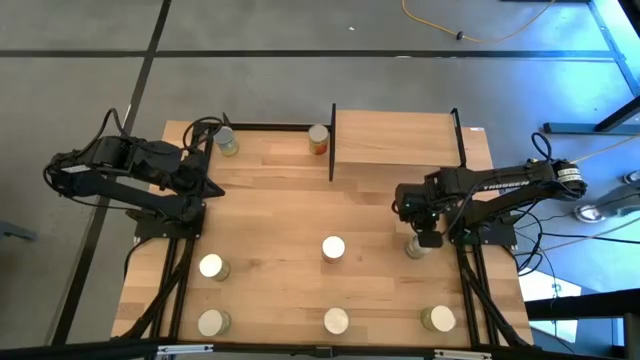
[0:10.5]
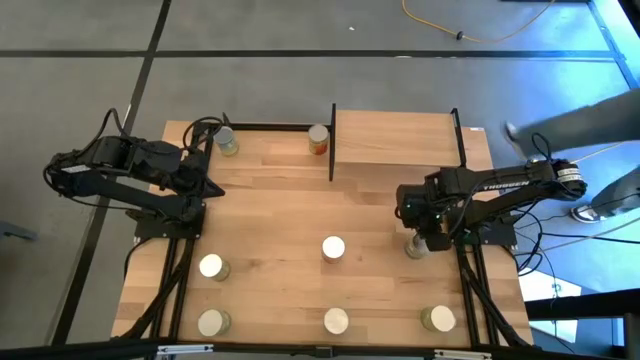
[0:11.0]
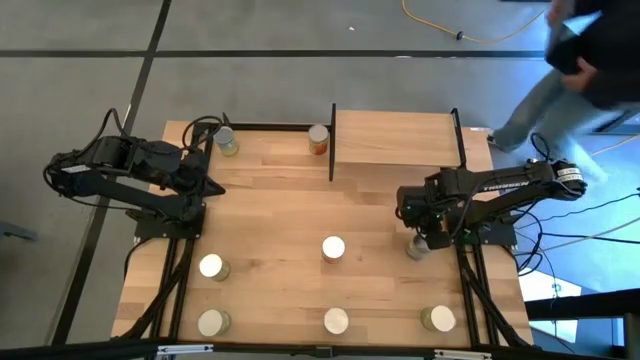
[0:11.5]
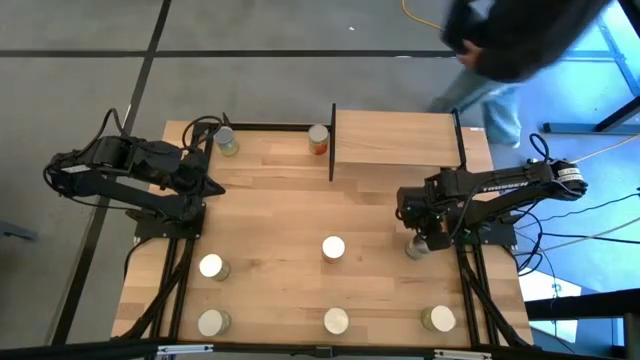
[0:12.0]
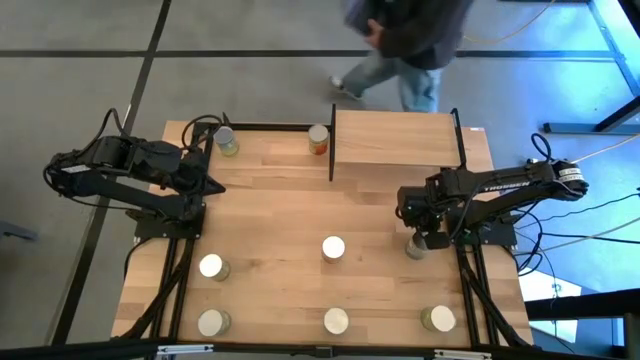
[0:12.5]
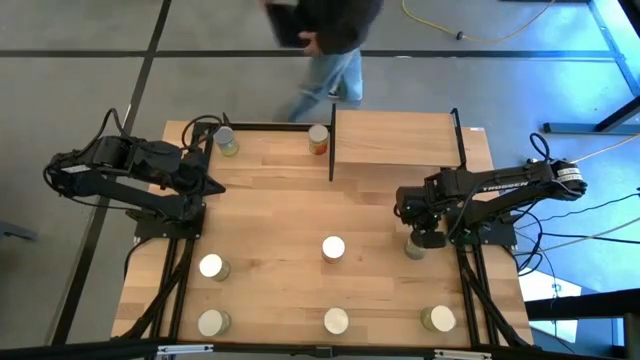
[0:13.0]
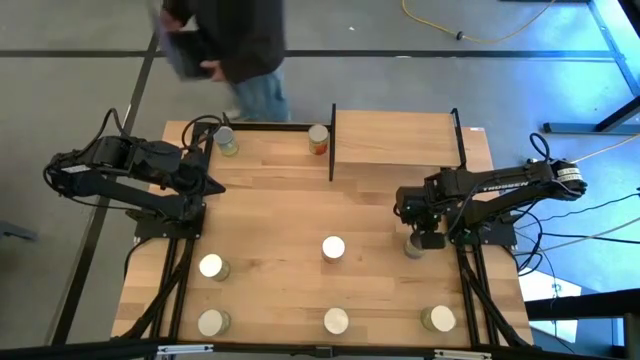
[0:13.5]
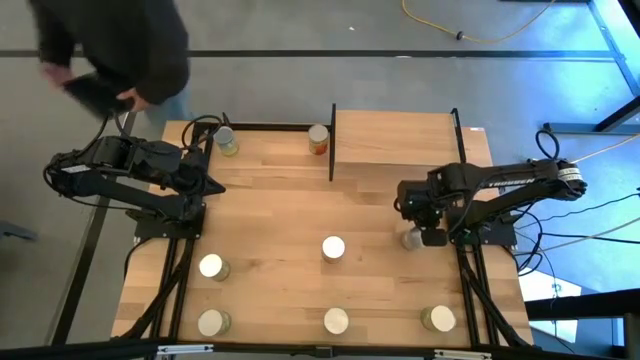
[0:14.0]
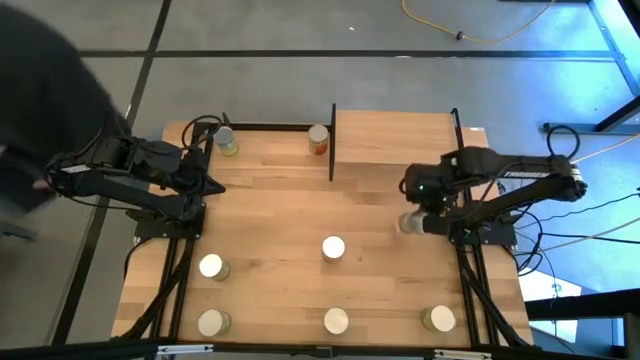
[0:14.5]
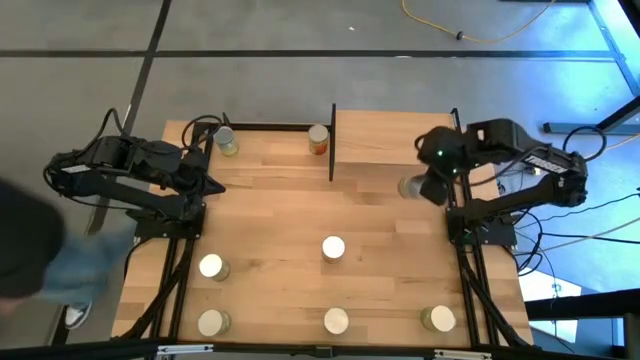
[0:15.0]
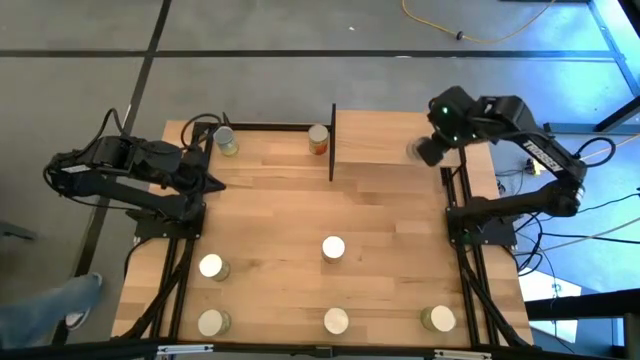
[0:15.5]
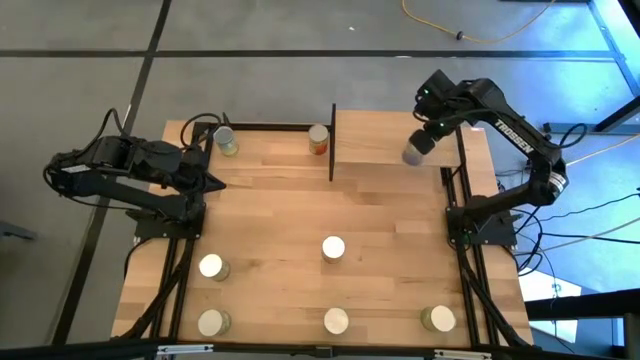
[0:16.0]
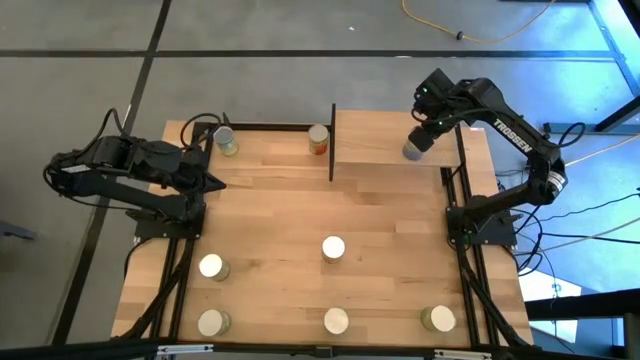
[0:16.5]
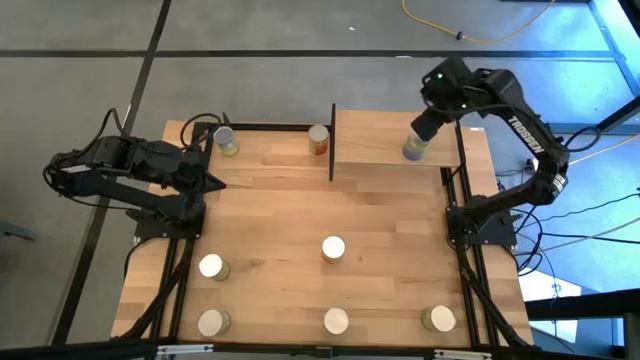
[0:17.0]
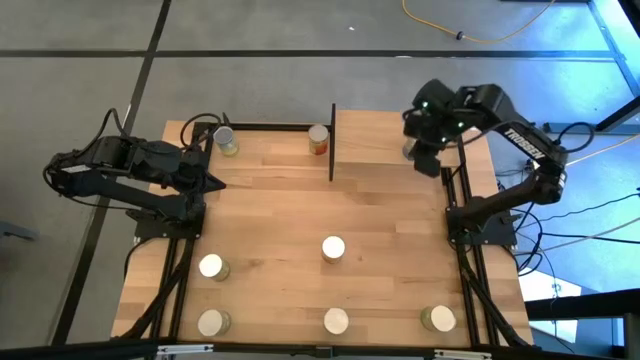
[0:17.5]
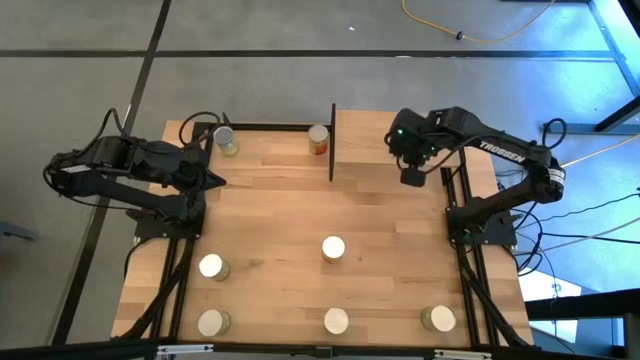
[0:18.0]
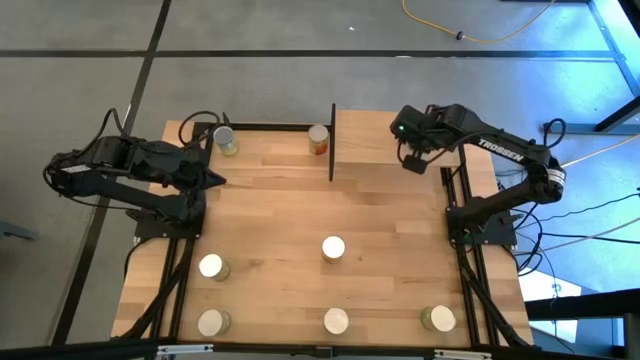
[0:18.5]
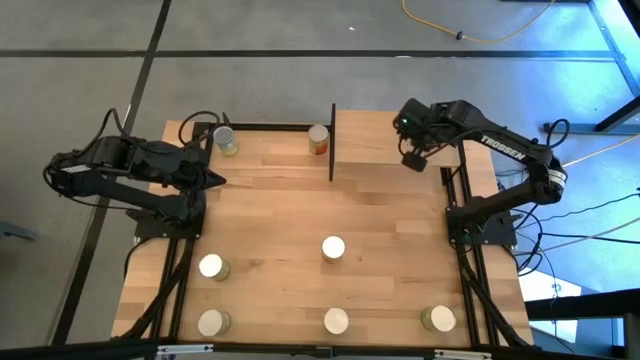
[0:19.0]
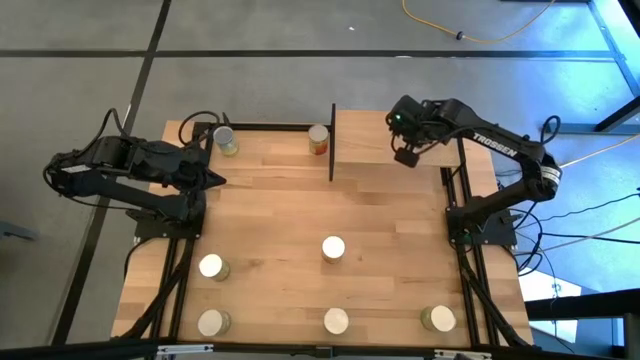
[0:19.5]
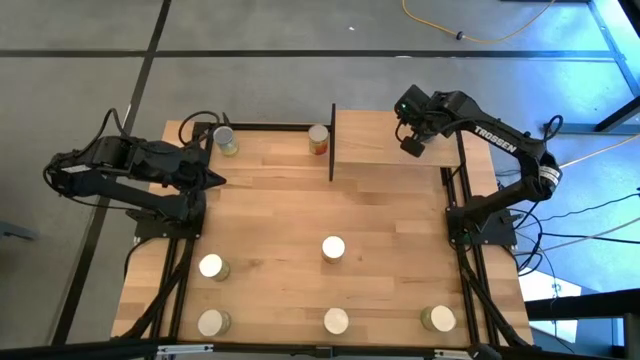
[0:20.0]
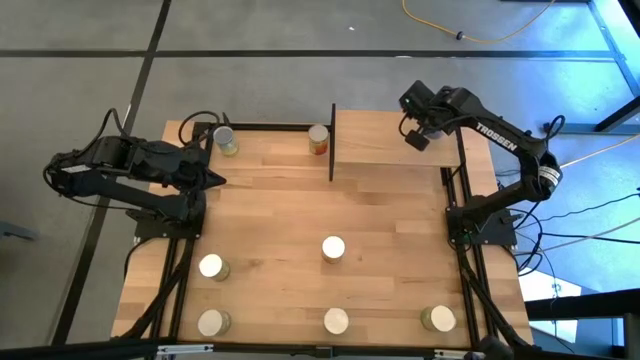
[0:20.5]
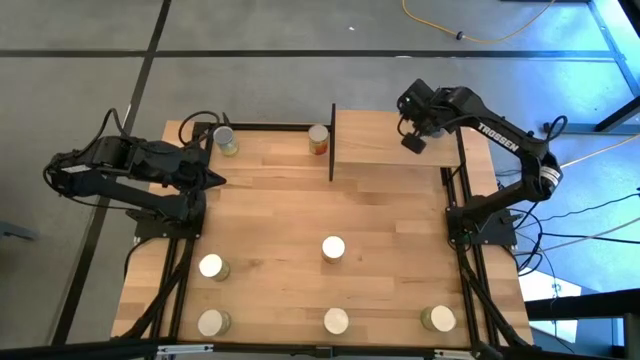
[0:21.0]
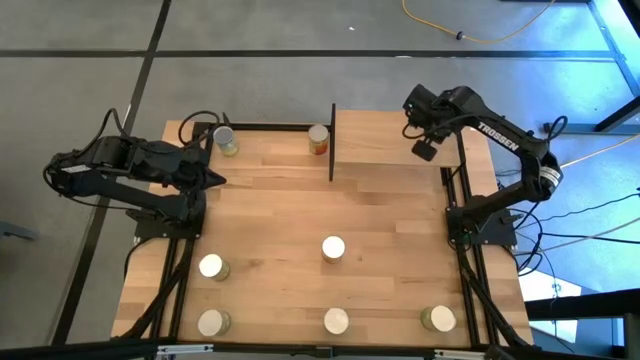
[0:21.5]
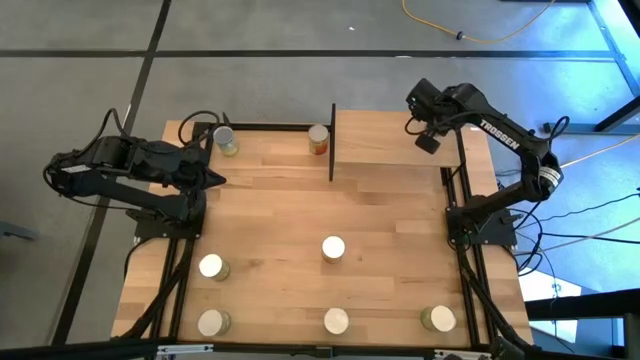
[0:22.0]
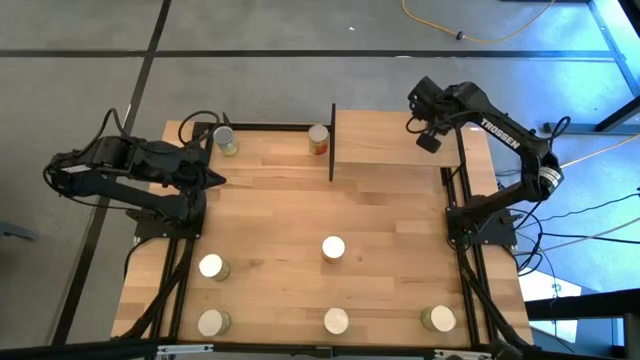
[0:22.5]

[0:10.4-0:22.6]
Task: Pick and place cans onto a shelf
Put the canned peas on the shelf
